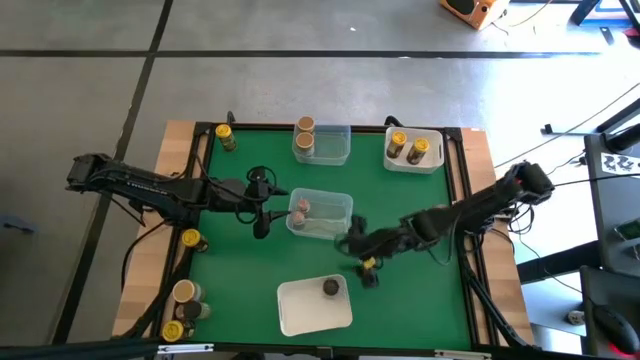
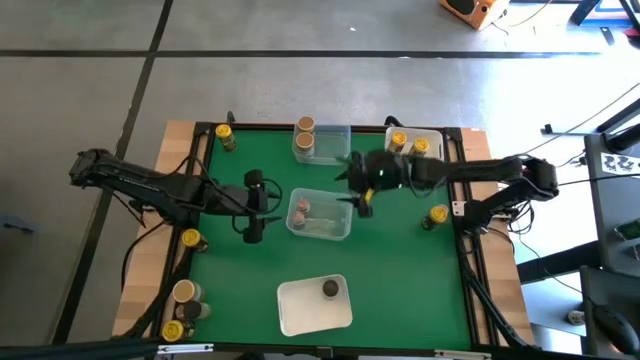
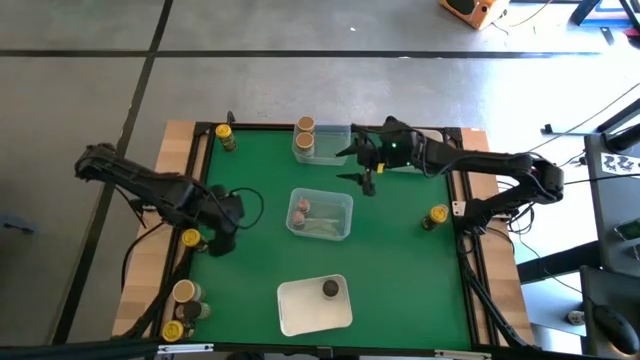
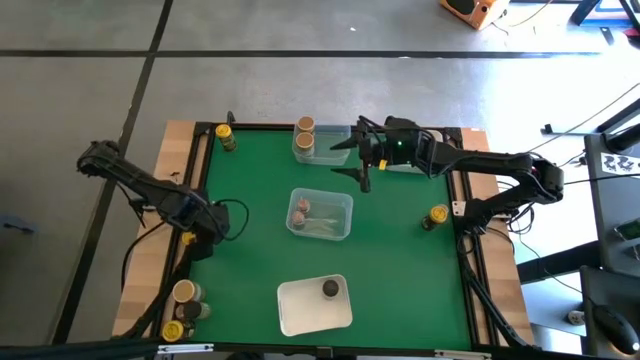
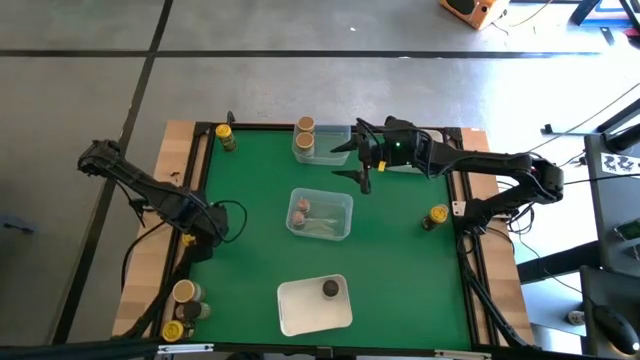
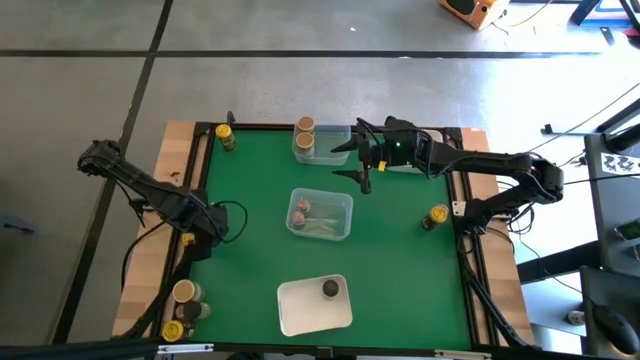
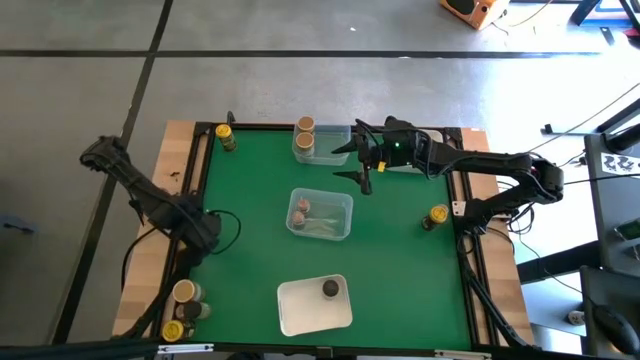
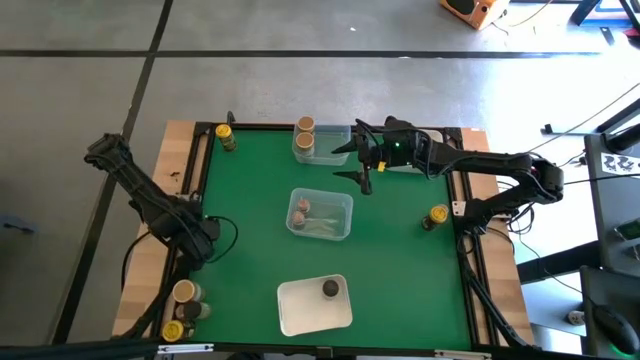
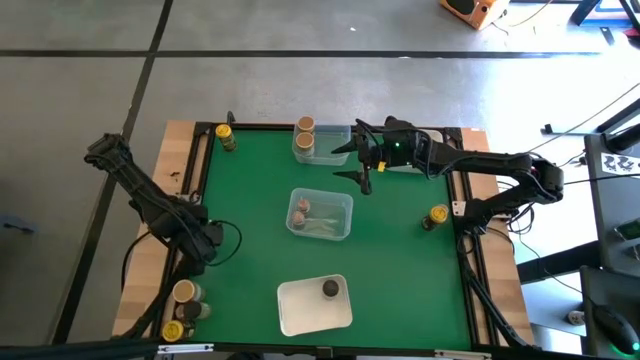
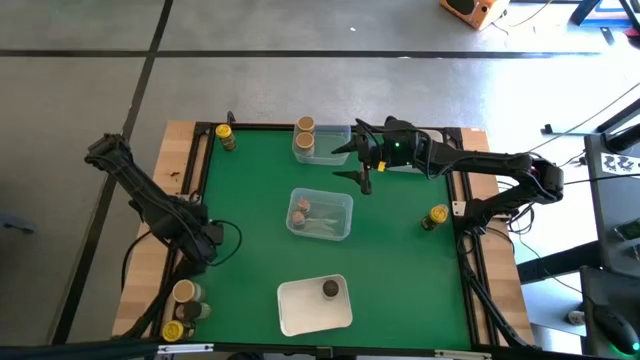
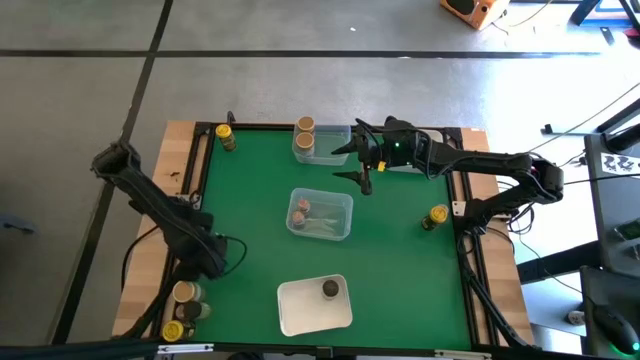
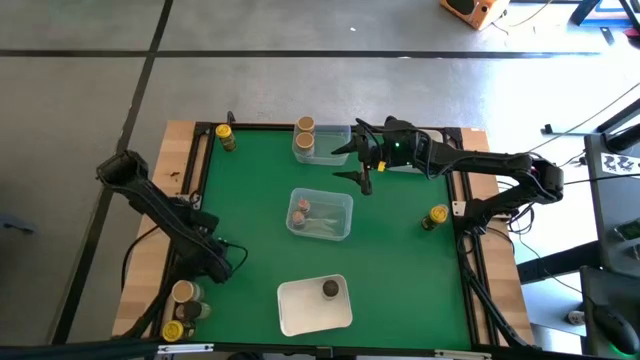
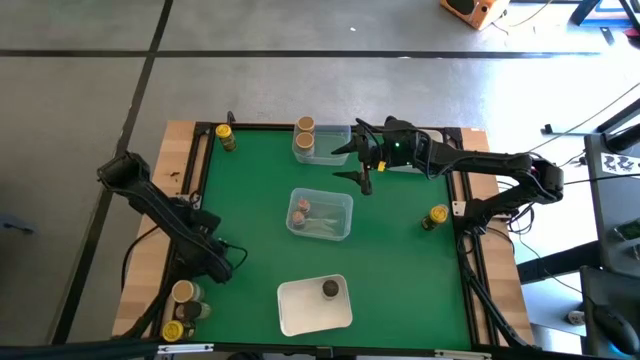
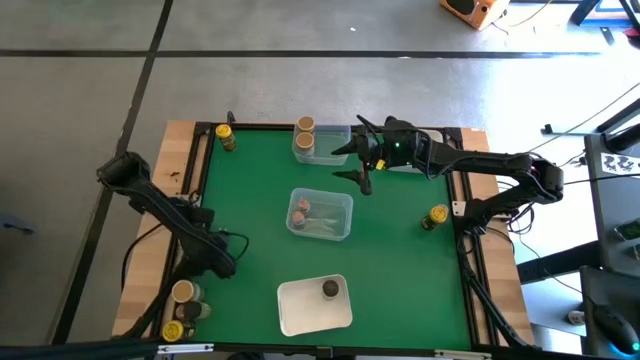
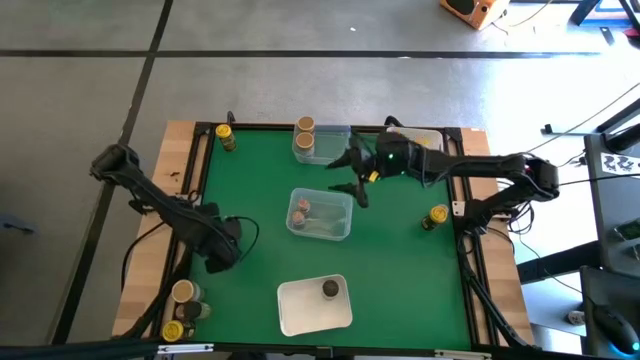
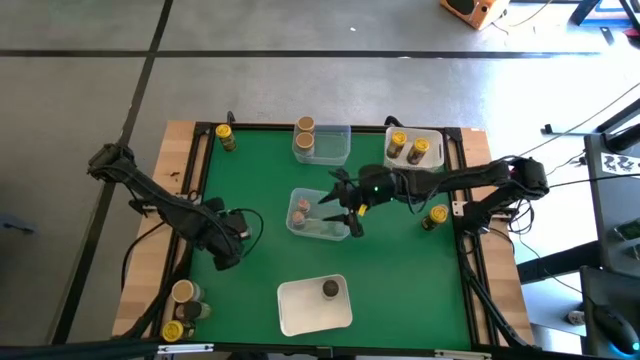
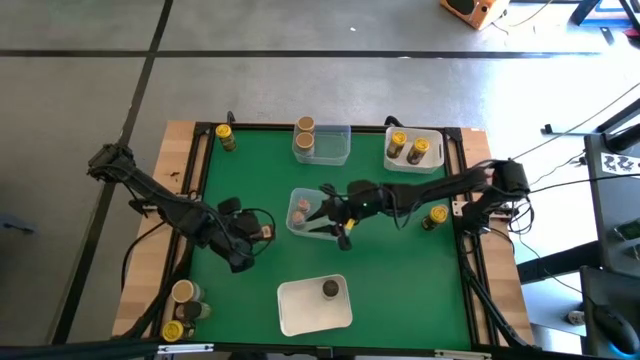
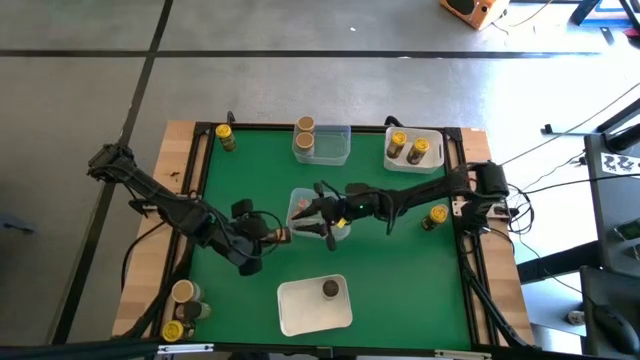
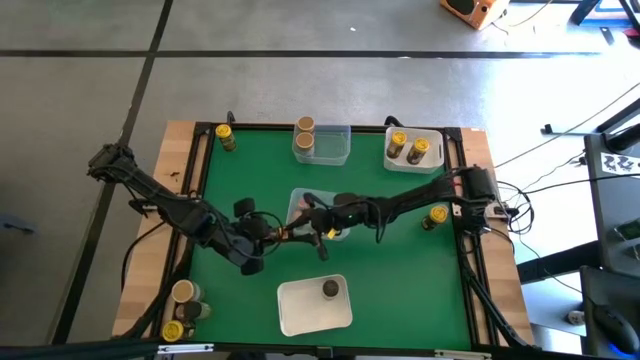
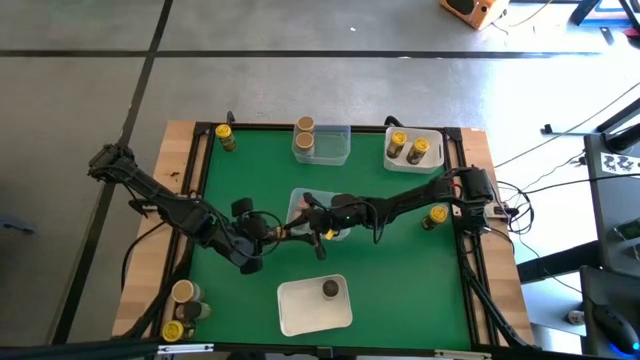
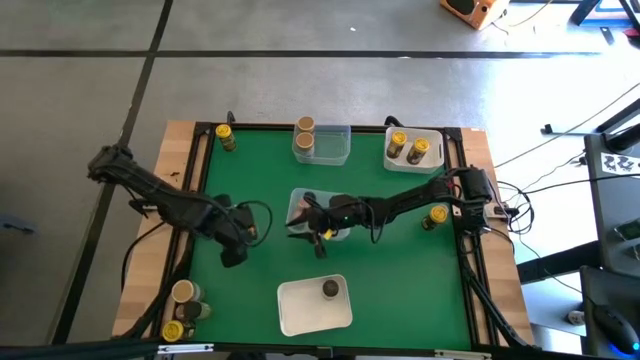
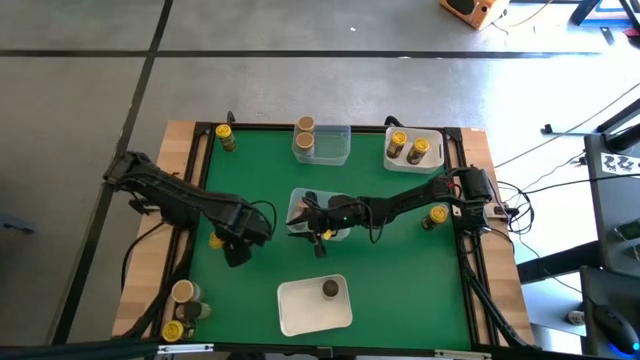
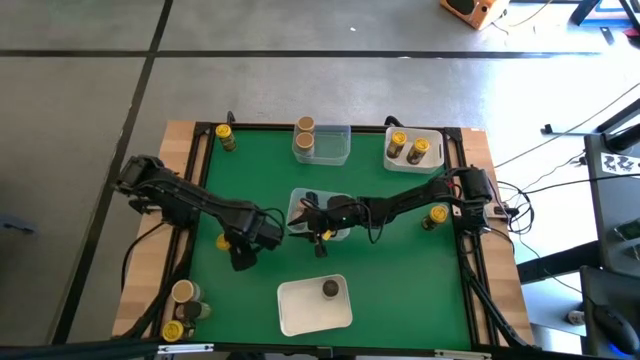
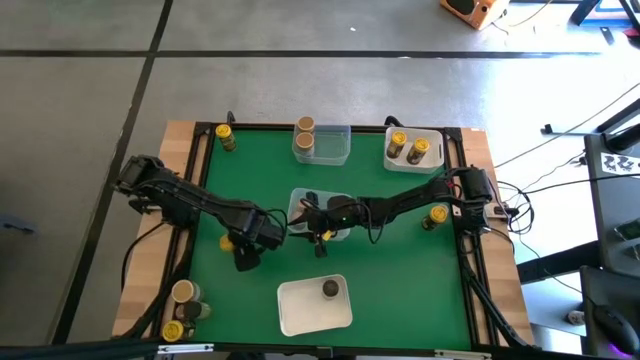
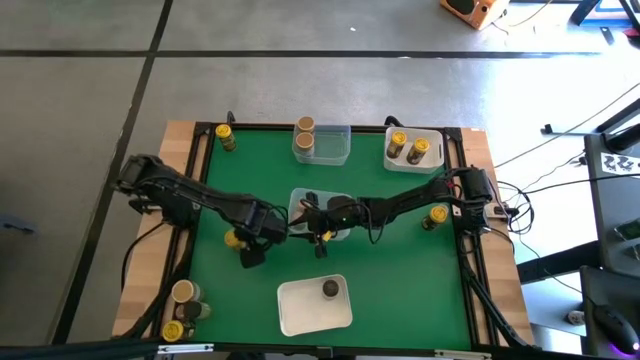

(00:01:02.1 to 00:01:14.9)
Task: Sort spices by type
Put the yellow seasoning bottle into the top white bin

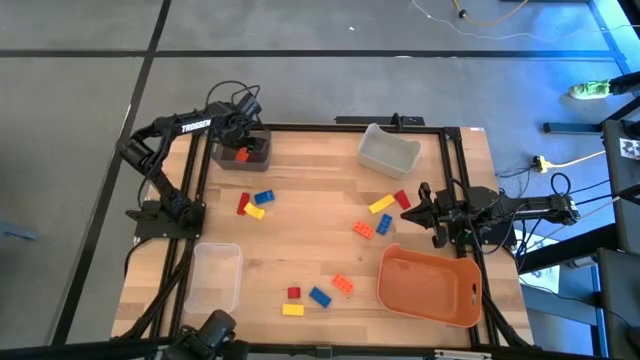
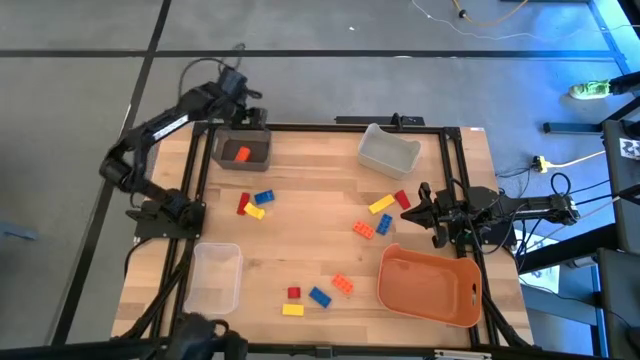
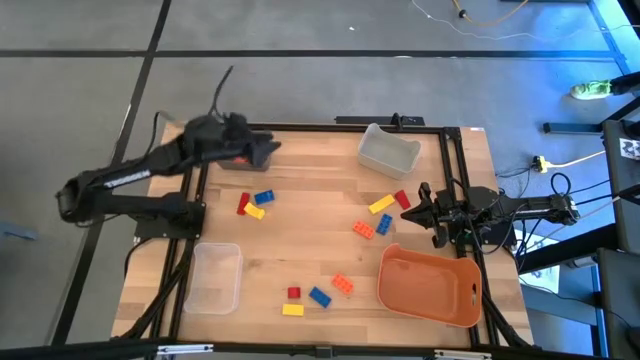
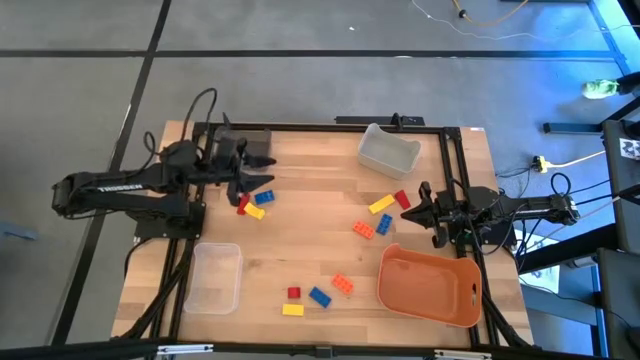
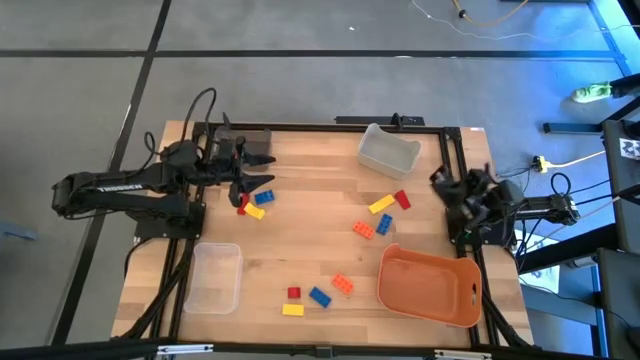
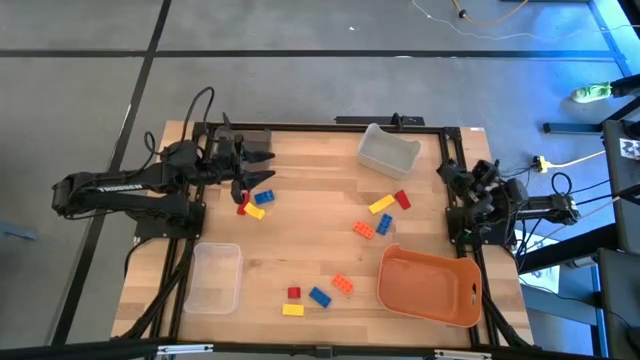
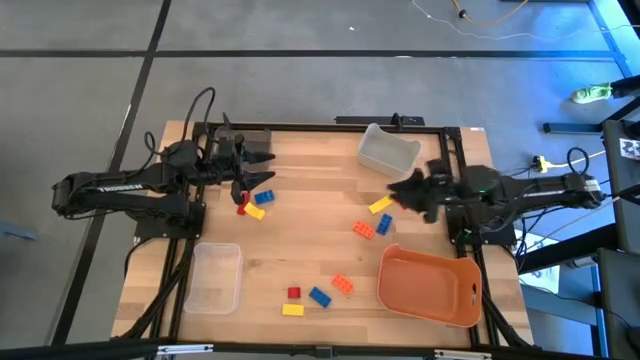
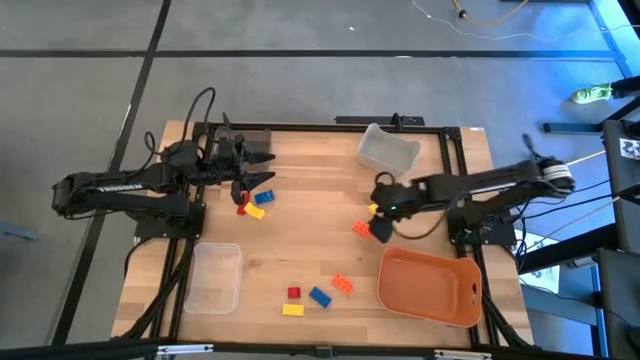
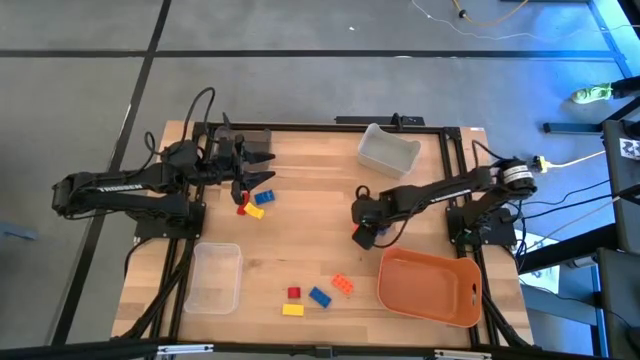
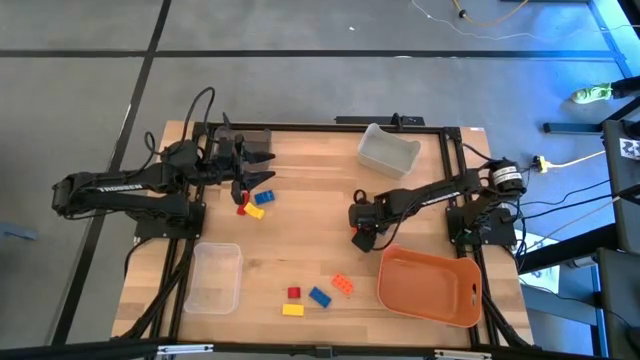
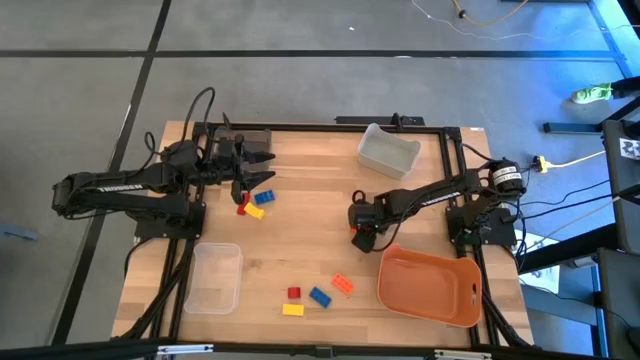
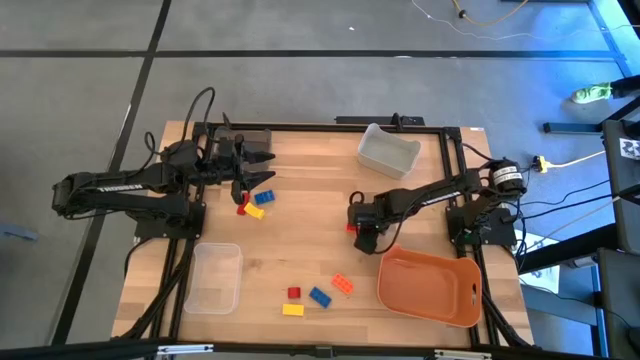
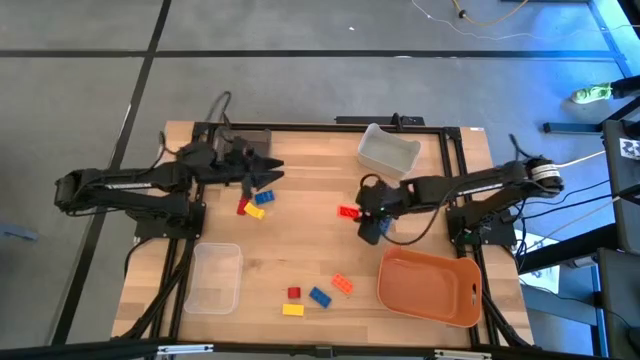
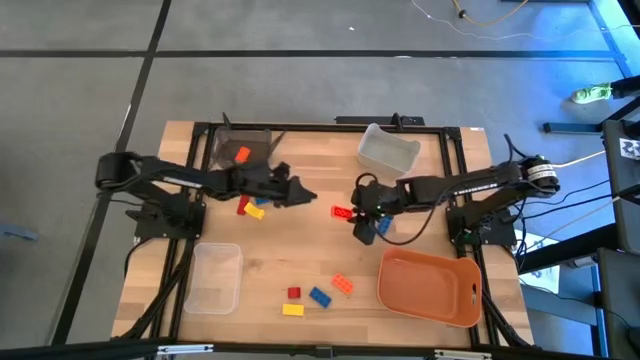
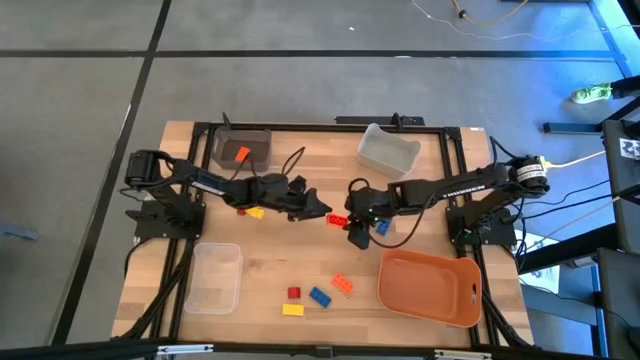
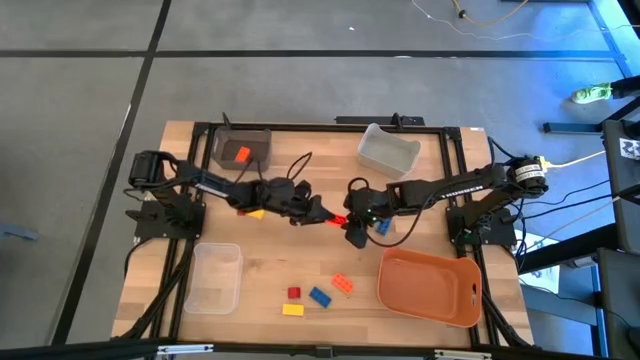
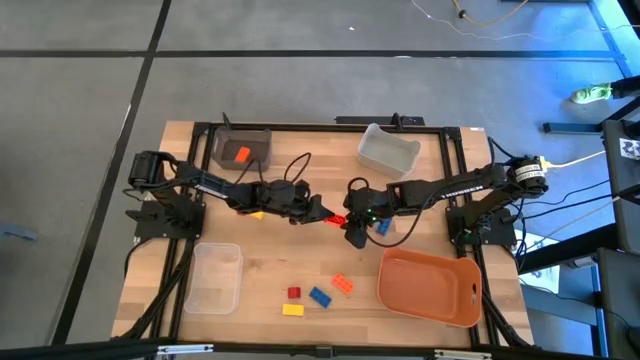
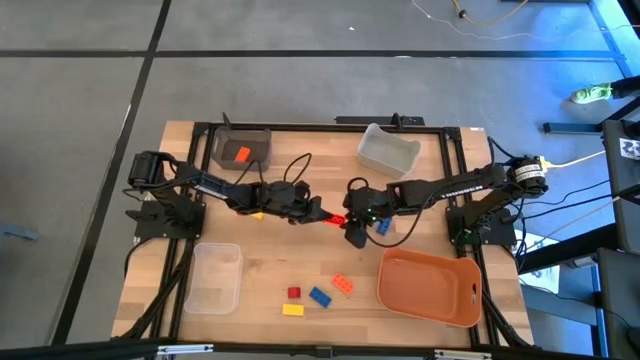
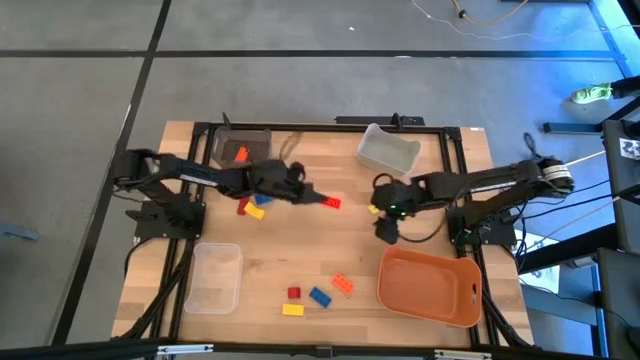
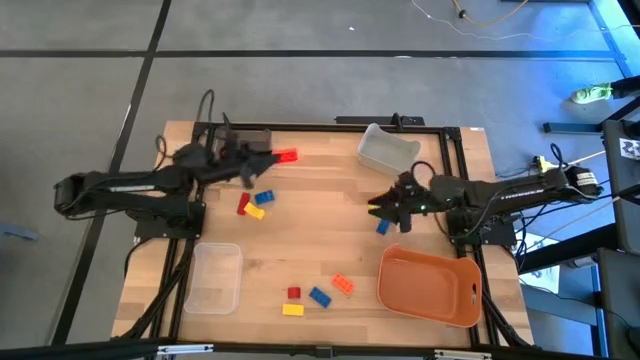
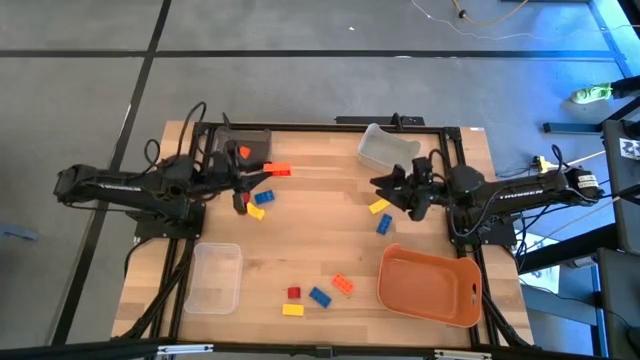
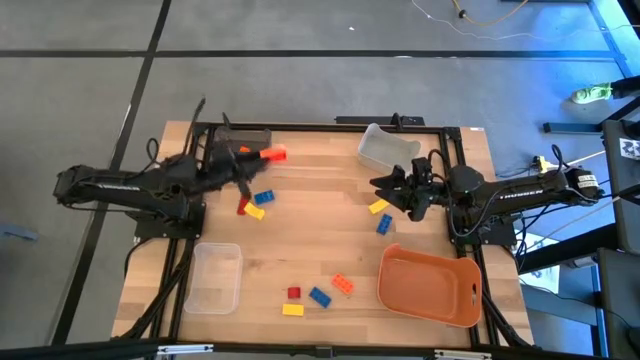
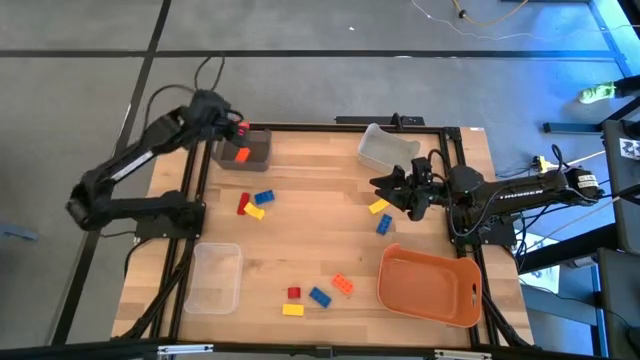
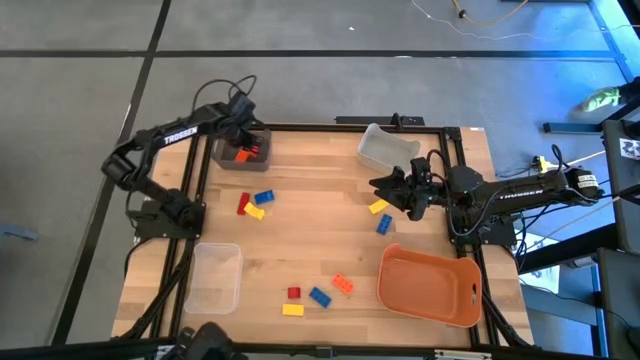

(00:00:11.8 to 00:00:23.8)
Task: Sort & place blocks by color
Put the top orange gamepiece into the black bin
